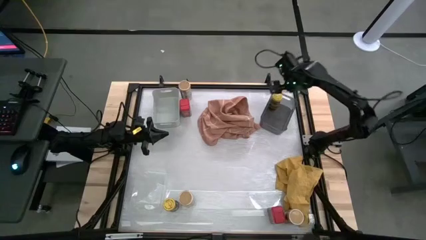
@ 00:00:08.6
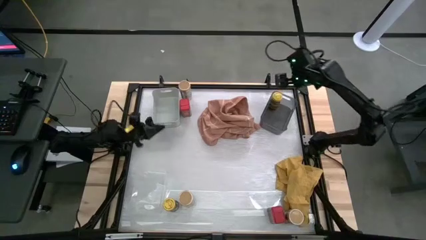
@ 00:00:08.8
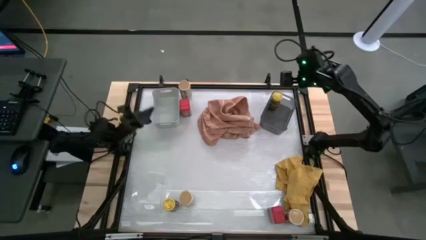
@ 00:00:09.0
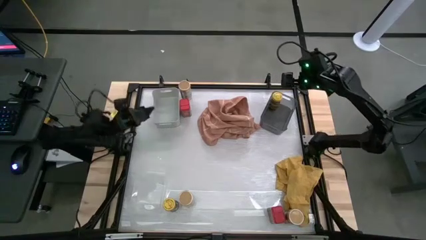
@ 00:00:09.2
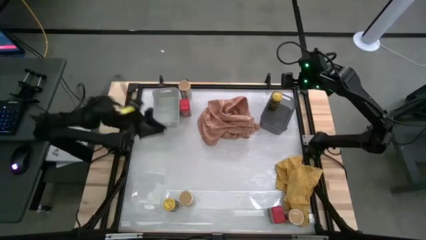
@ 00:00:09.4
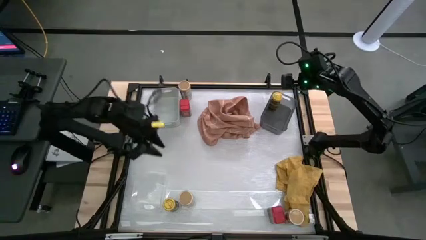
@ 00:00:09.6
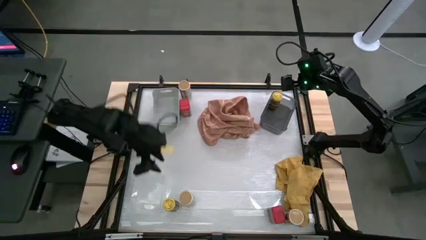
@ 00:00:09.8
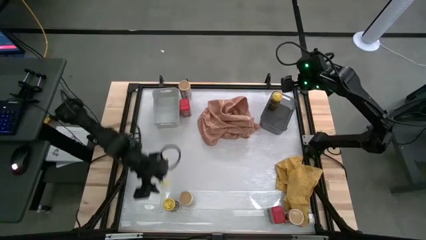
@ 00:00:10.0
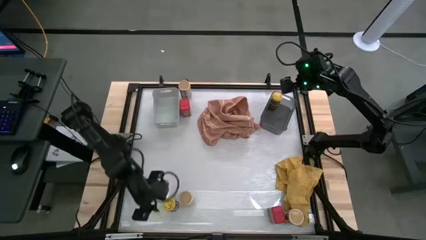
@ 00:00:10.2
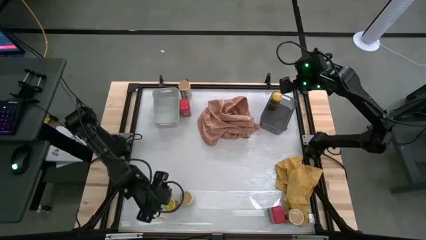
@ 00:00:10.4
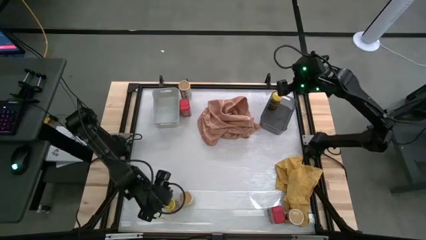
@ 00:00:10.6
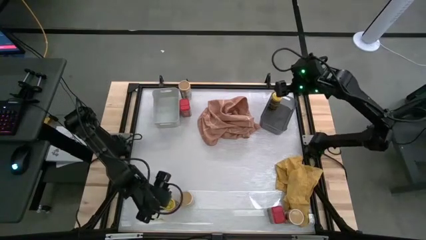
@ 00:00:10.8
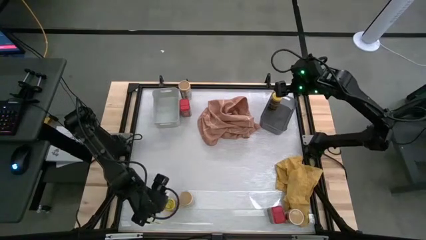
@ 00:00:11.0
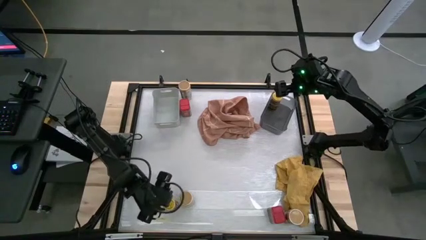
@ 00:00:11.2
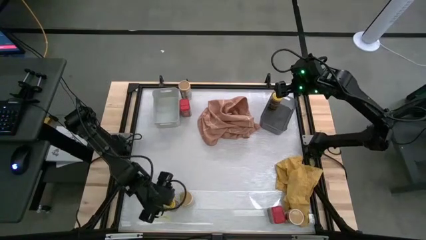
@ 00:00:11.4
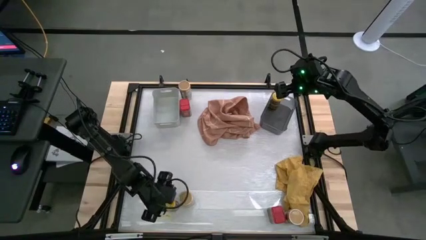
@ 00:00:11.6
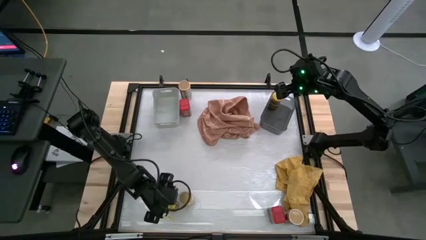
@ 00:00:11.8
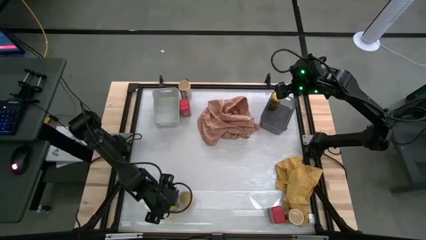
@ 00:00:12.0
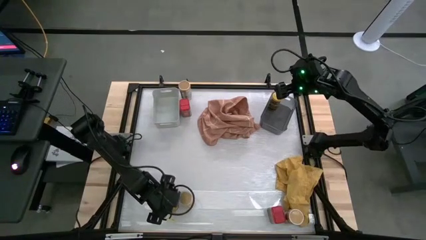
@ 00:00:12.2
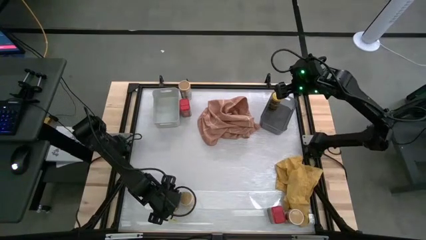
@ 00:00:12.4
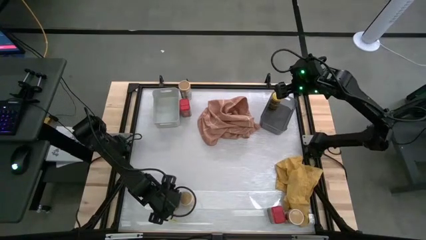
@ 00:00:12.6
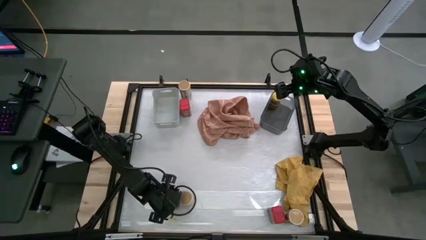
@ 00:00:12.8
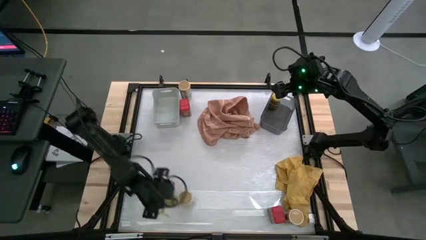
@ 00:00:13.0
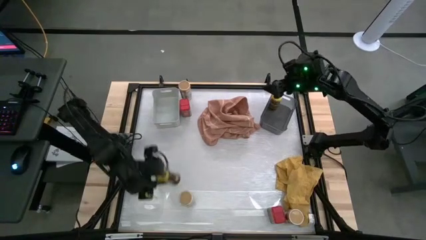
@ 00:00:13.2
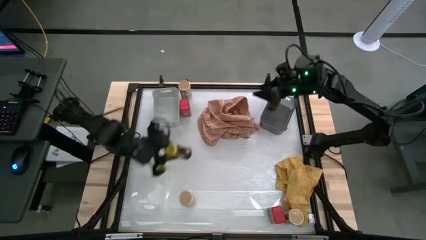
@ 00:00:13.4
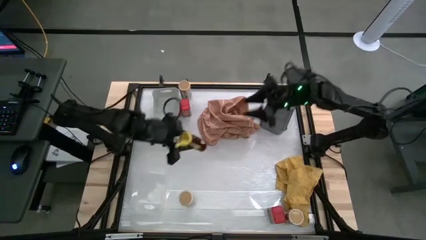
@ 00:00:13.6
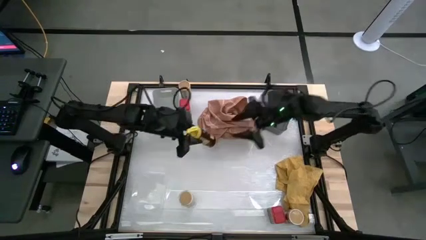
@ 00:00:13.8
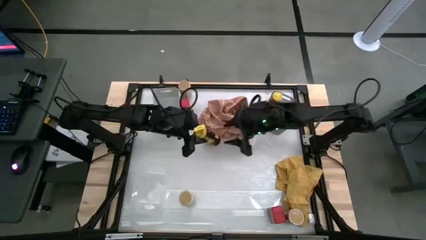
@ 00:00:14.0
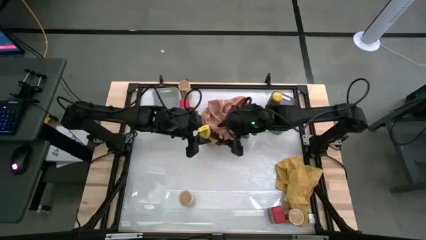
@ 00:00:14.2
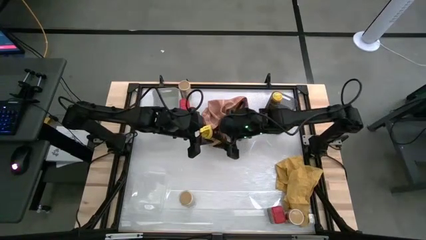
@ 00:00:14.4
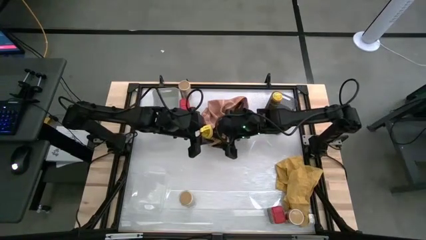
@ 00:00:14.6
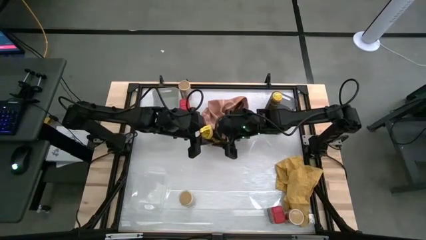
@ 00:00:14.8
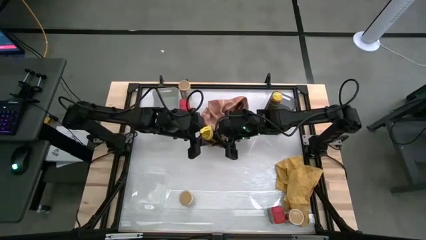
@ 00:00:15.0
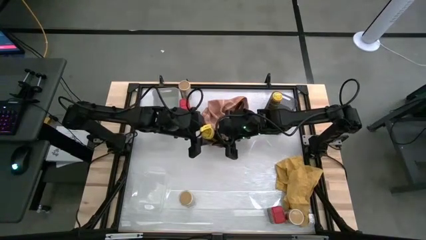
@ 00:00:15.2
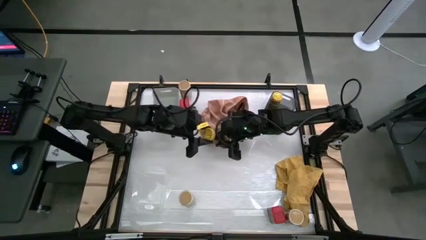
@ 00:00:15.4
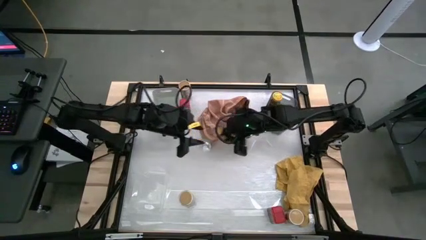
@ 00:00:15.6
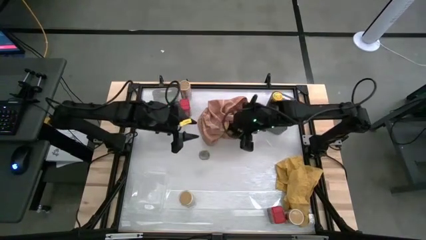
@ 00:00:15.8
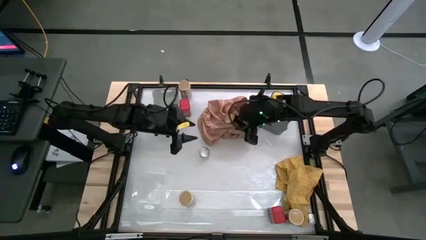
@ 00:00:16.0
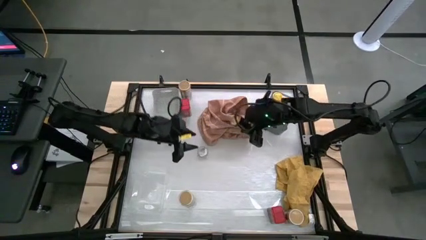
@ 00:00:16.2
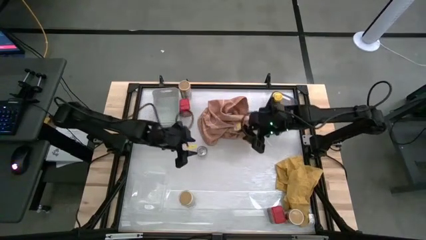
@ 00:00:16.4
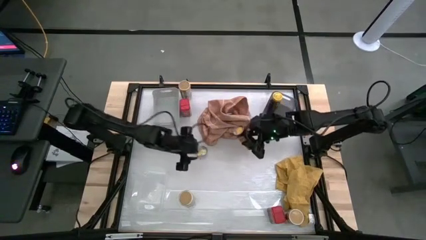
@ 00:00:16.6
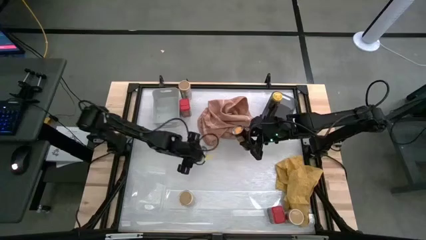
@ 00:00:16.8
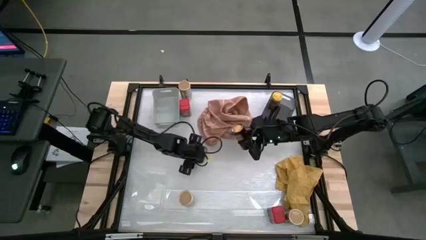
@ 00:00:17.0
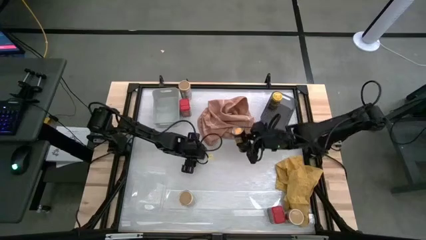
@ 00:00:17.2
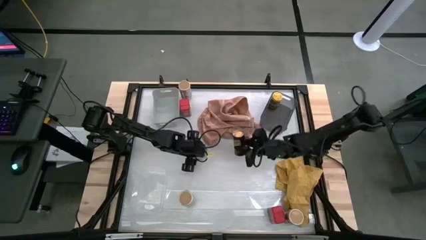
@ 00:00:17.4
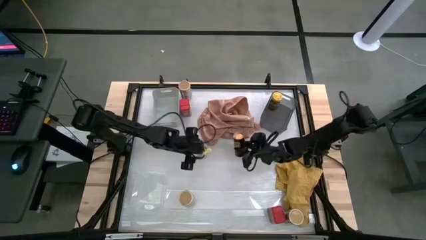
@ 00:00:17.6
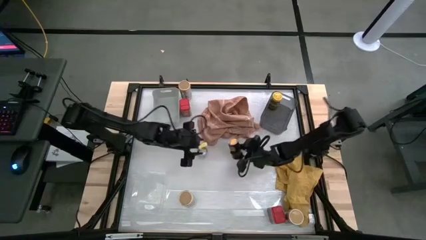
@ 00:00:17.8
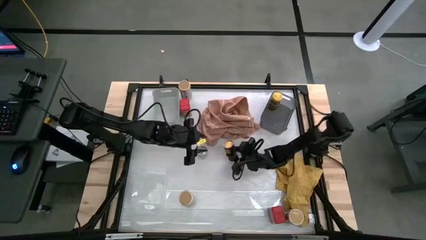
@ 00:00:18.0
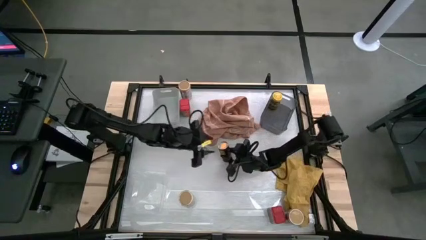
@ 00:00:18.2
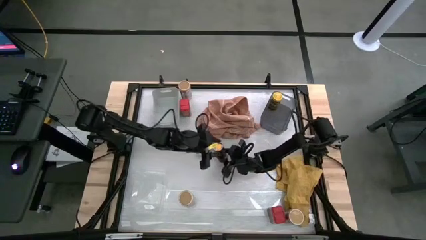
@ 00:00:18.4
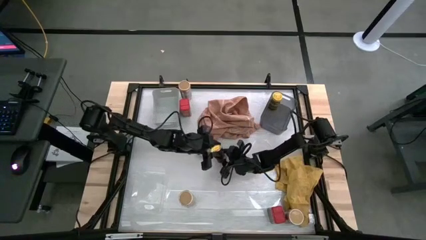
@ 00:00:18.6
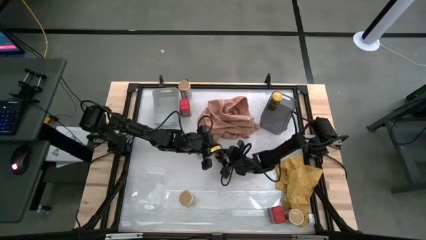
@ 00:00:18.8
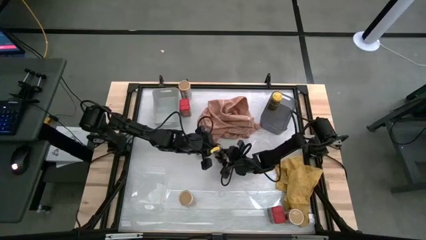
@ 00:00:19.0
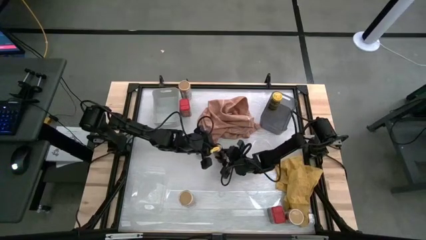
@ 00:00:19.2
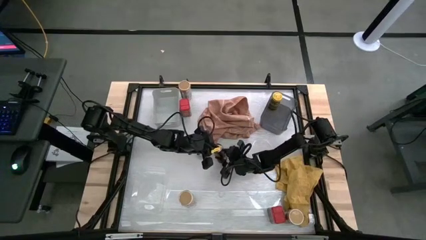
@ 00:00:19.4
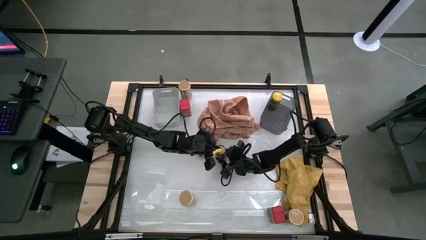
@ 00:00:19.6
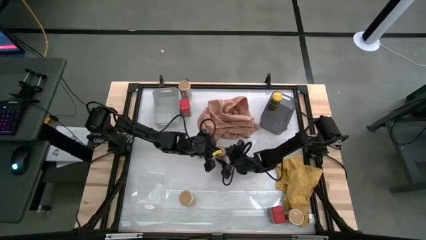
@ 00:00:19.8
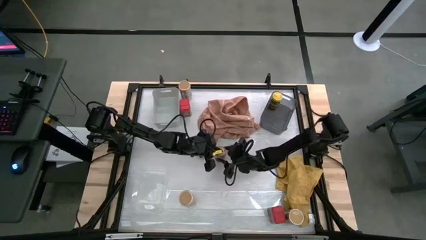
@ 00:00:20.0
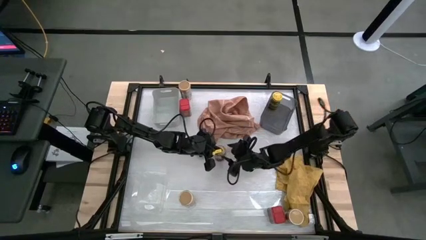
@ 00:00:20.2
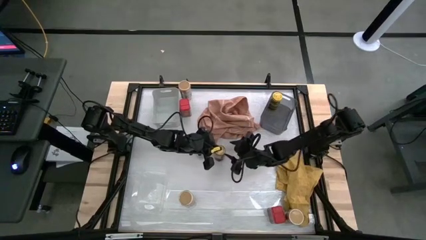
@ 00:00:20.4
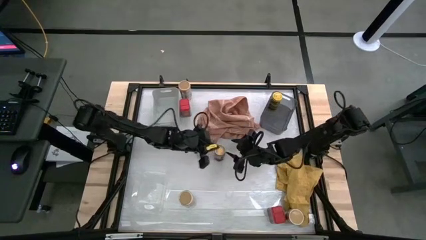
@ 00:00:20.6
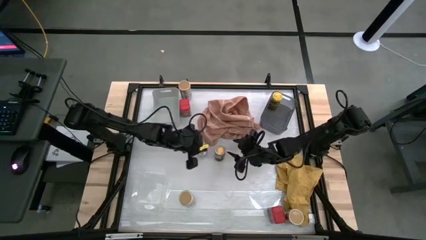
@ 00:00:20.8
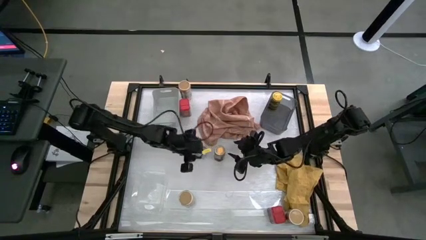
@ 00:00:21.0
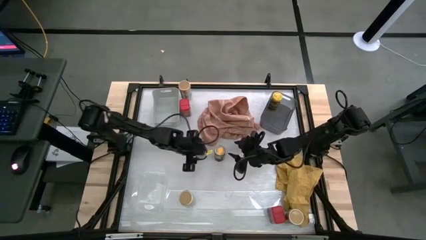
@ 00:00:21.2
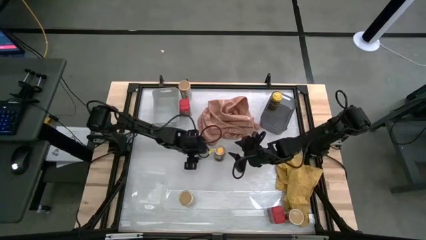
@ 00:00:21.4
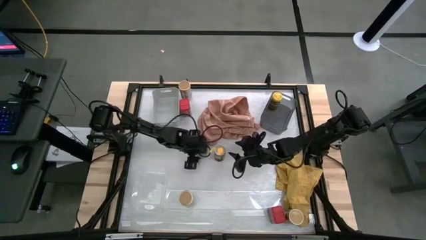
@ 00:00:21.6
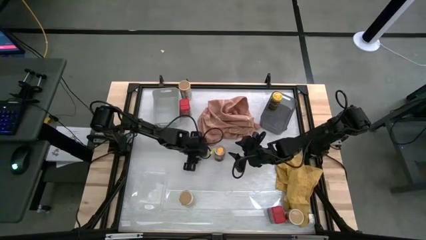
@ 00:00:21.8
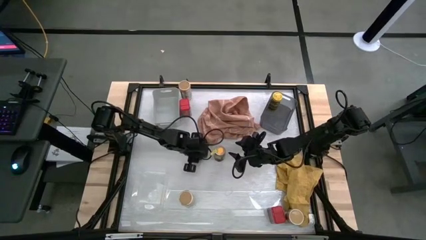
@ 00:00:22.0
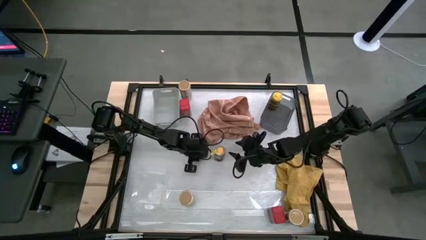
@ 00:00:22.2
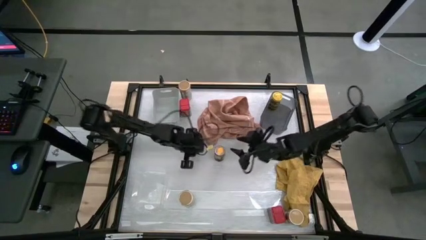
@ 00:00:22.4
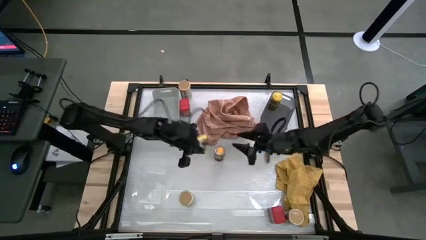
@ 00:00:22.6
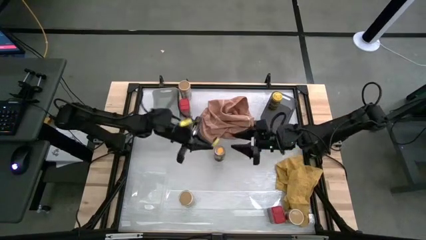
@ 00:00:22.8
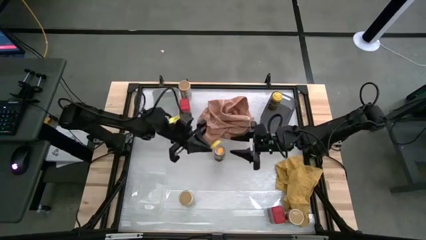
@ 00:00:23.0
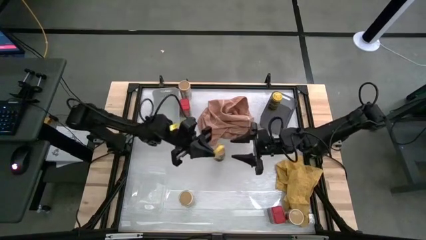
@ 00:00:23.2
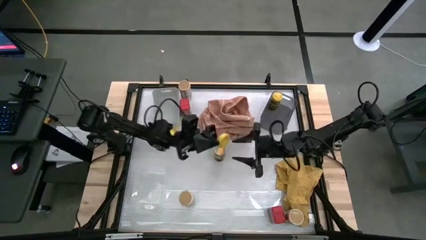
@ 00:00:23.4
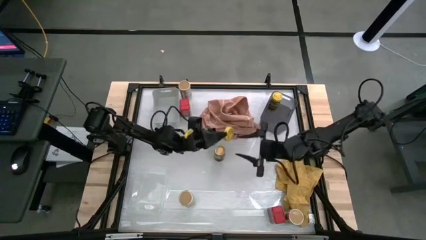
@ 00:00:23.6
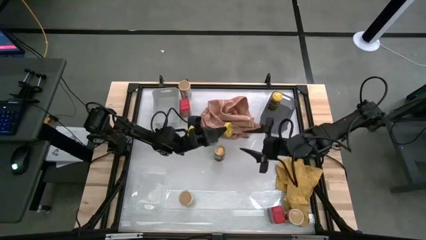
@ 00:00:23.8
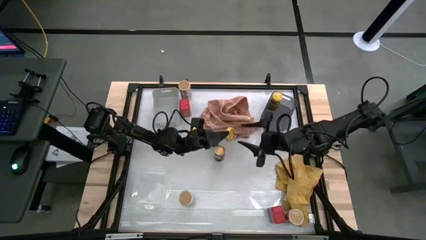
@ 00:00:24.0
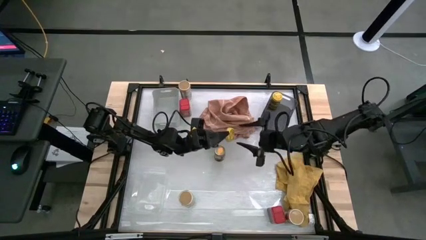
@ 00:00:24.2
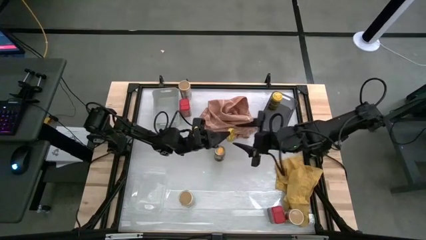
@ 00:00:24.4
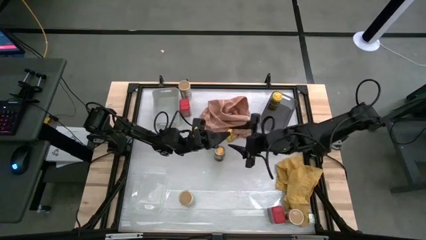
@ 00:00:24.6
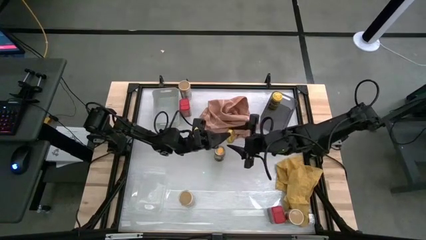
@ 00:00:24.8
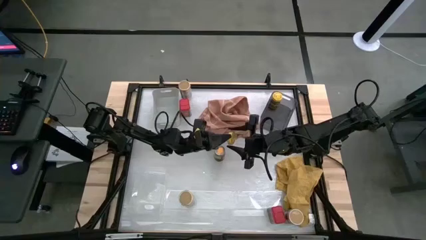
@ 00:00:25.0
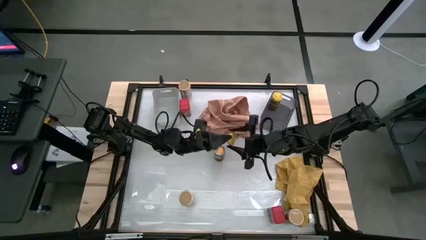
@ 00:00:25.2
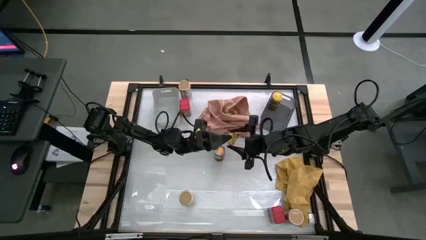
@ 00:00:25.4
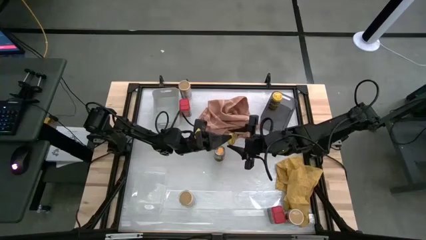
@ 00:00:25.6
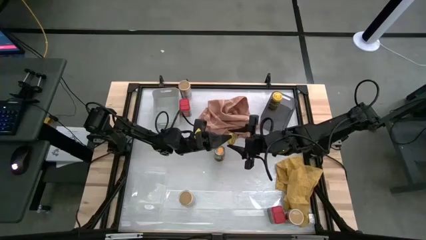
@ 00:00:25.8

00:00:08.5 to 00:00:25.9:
Task: Sort spices by type
Put the yellow seasoning bottle into the black bin
